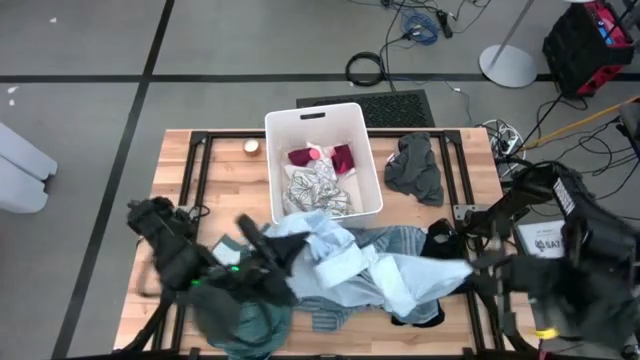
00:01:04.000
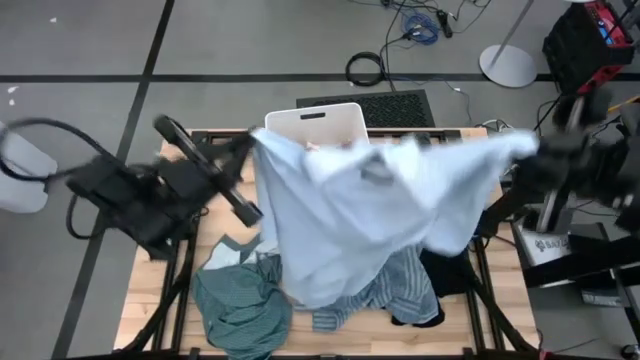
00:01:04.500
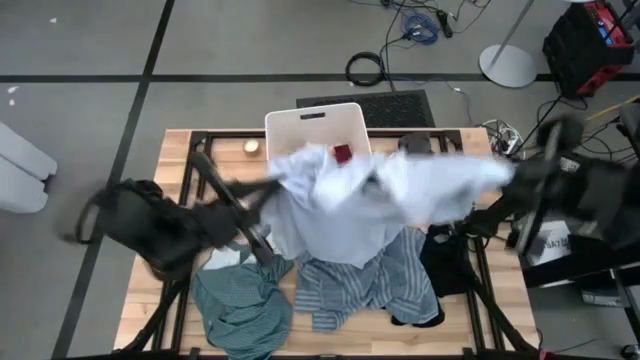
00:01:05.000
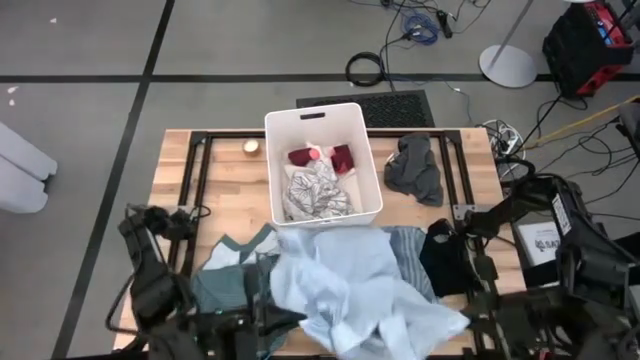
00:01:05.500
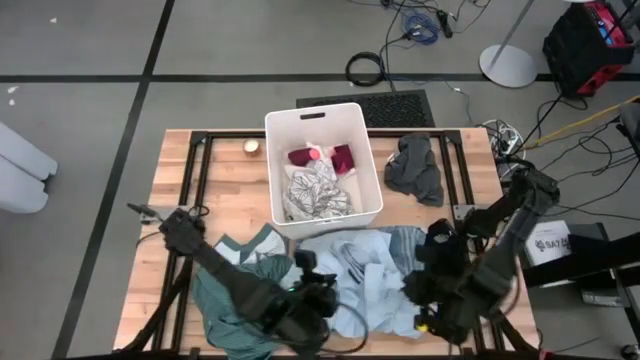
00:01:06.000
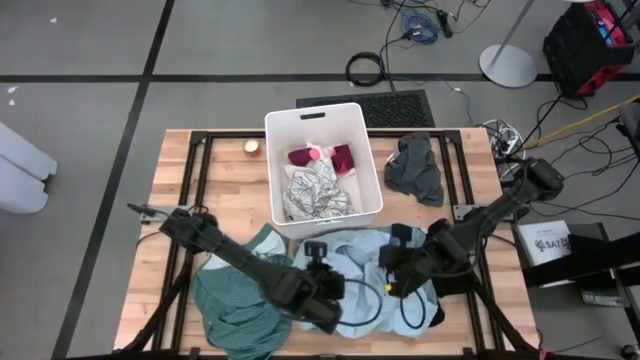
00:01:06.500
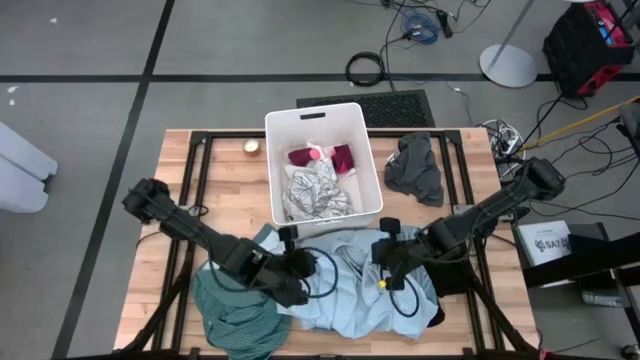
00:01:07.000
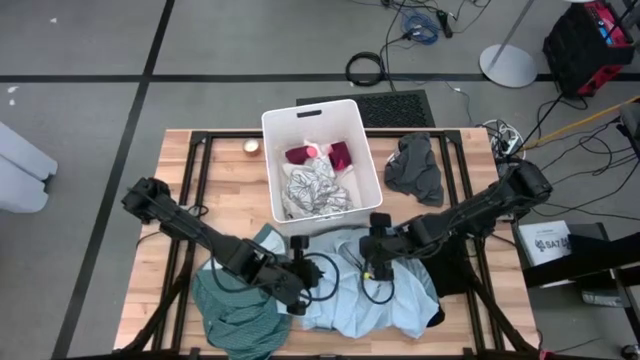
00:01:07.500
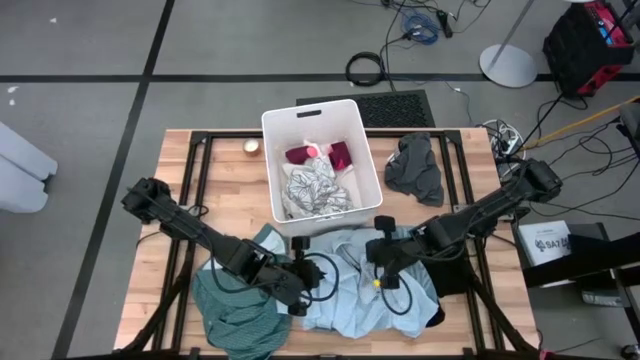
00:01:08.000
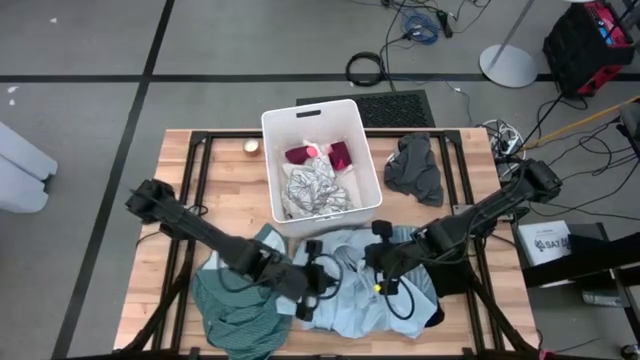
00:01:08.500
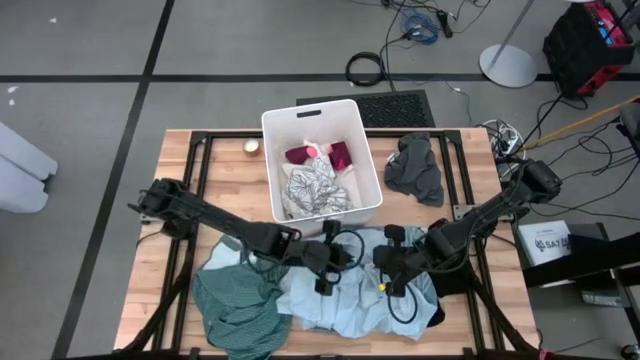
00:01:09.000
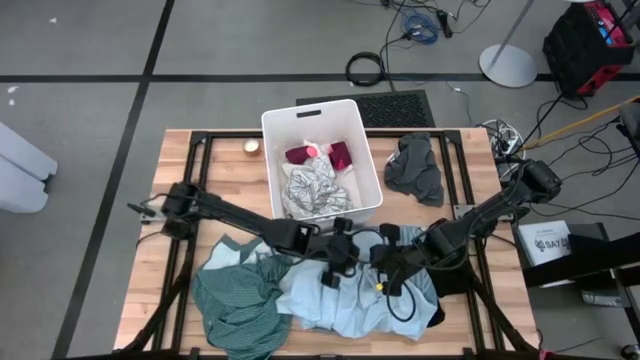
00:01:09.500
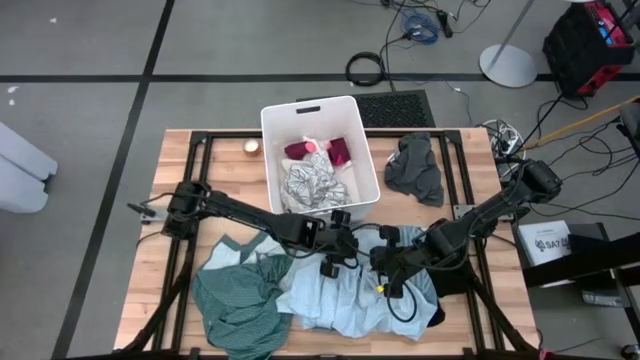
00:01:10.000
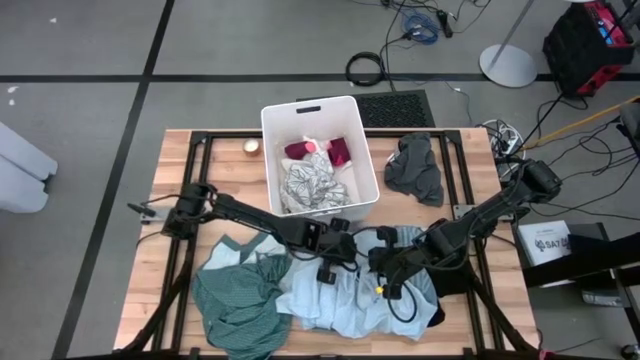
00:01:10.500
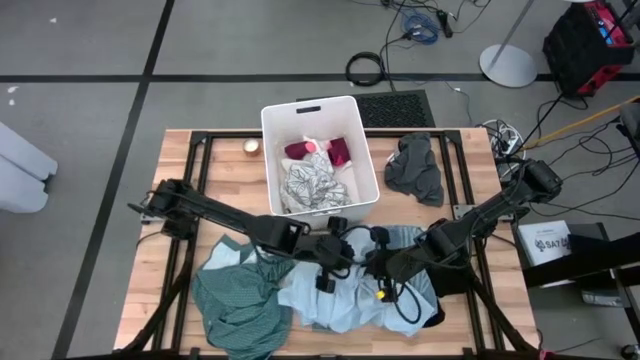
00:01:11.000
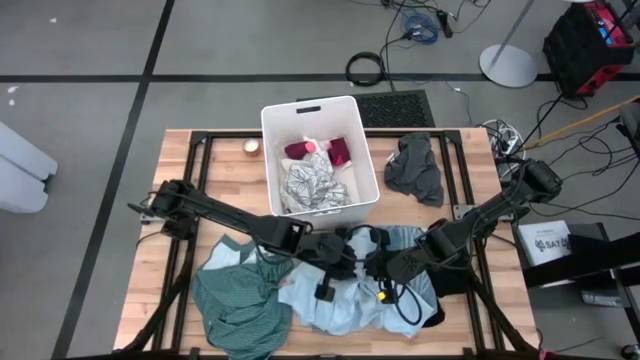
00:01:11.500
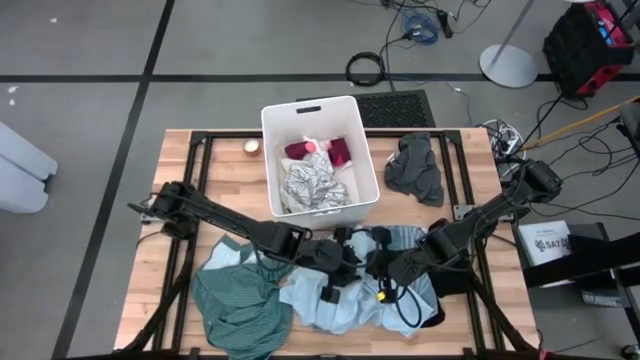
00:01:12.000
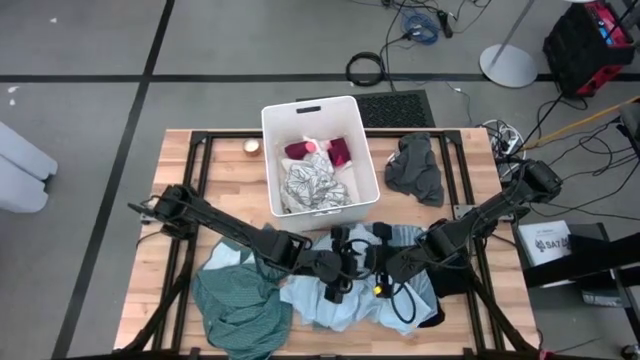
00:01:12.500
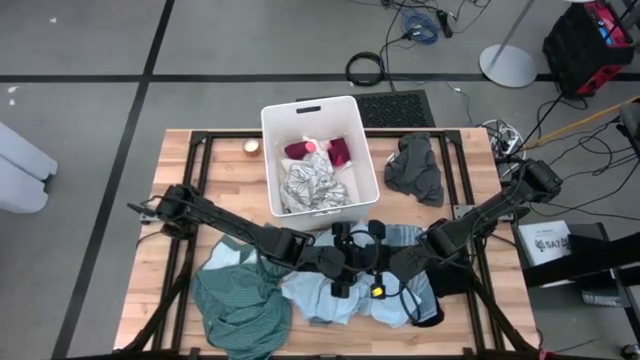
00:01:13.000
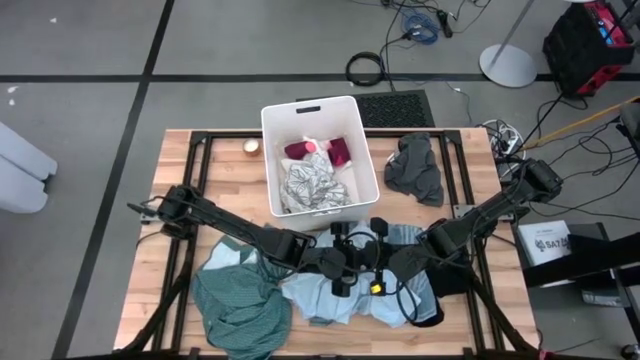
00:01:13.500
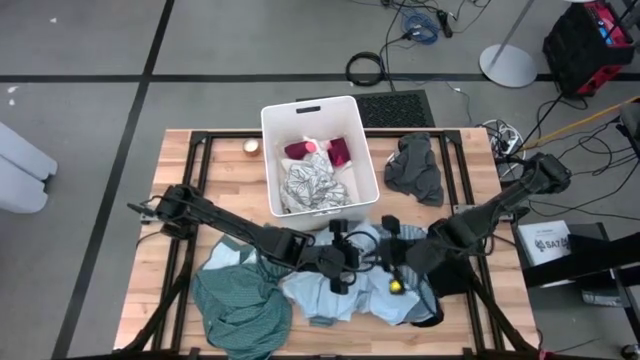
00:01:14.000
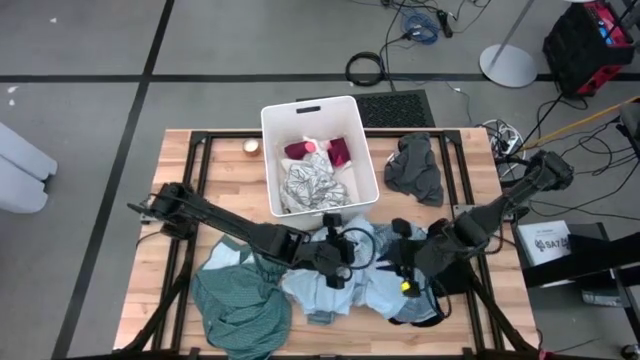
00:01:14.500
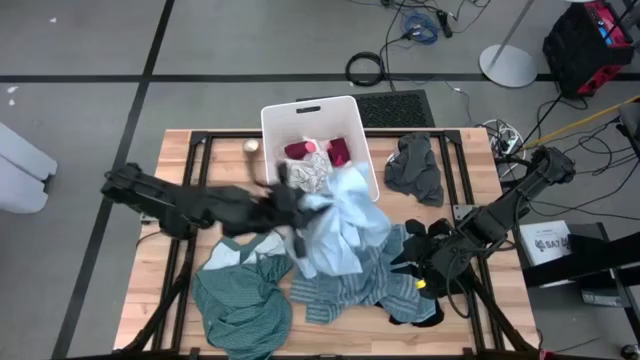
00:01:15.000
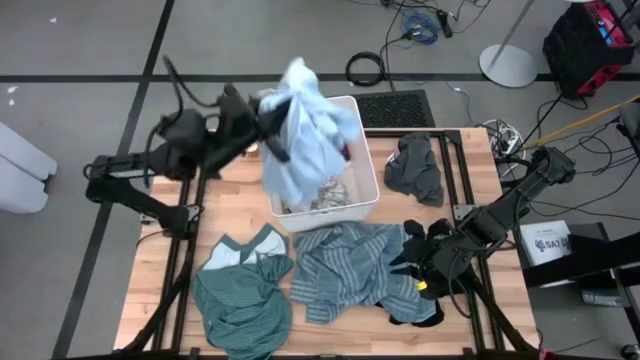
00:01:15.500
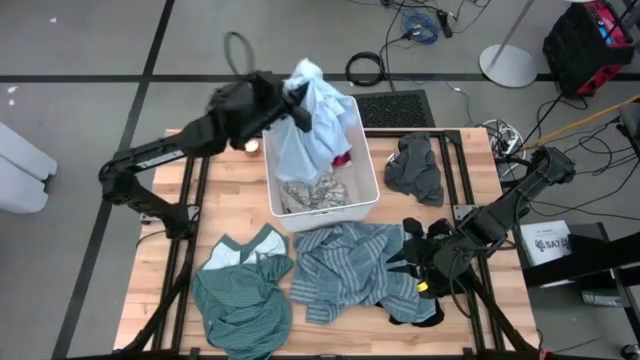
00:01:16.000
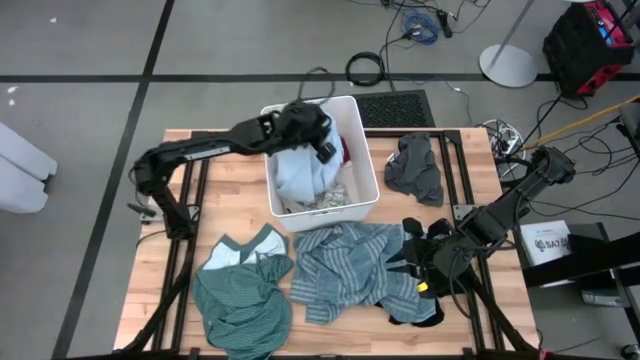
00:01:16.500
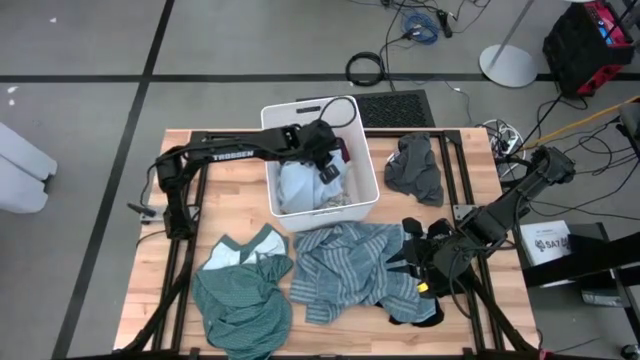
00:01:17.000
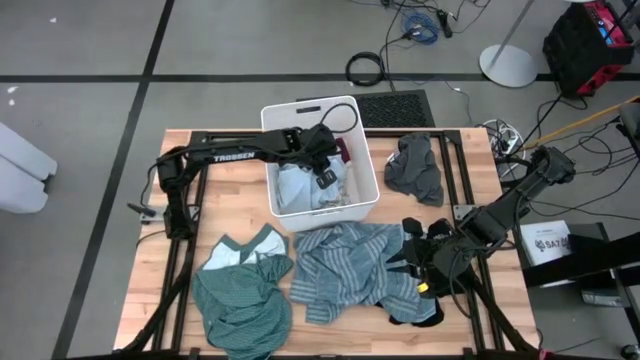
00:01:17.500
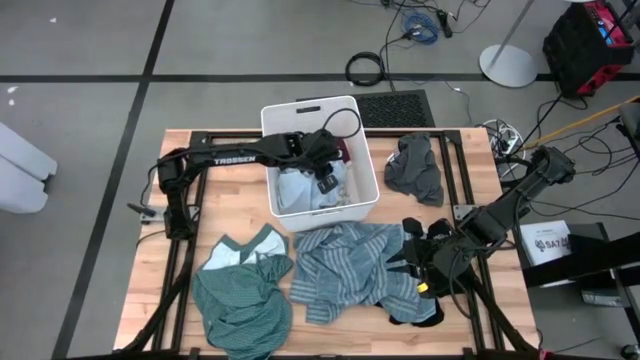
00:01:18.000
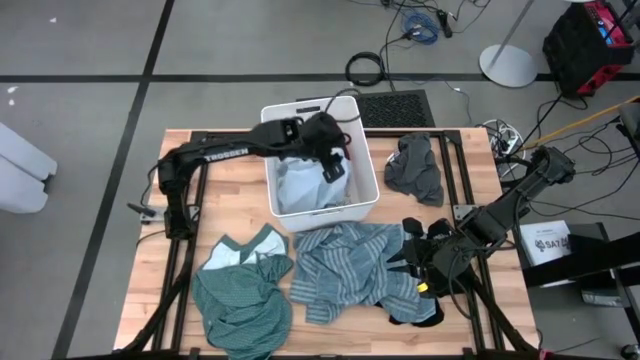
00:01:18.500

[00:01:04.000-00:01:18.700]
Task: Sort clothes
Put the light blue shirt into the white laundry bin

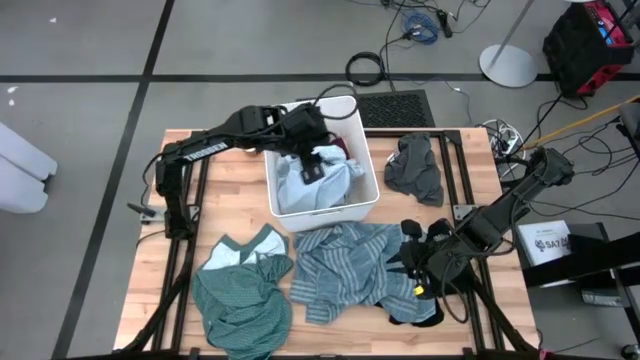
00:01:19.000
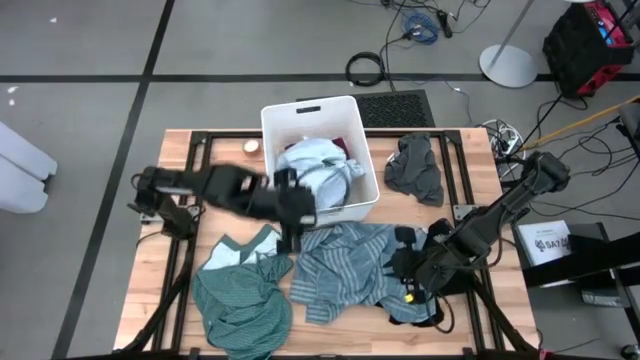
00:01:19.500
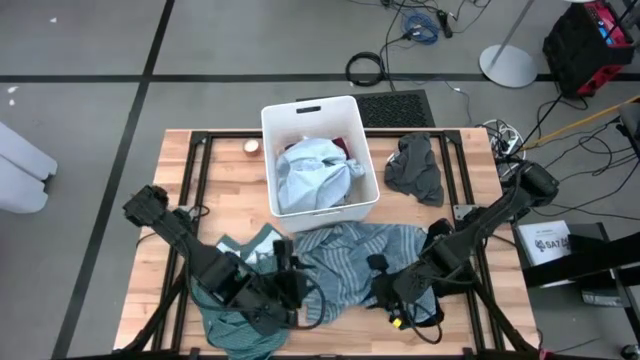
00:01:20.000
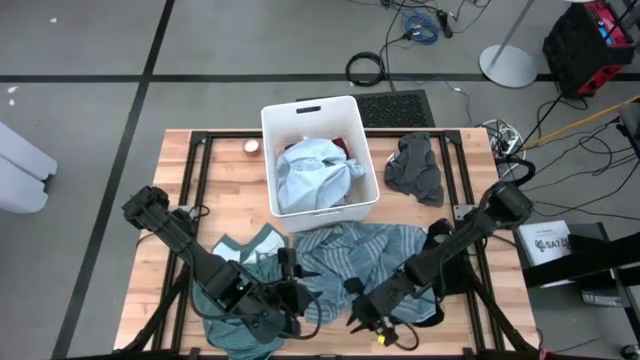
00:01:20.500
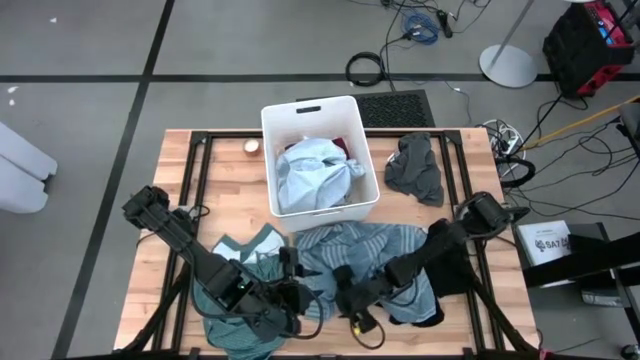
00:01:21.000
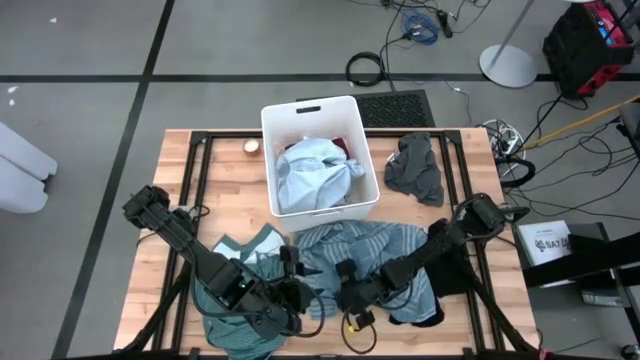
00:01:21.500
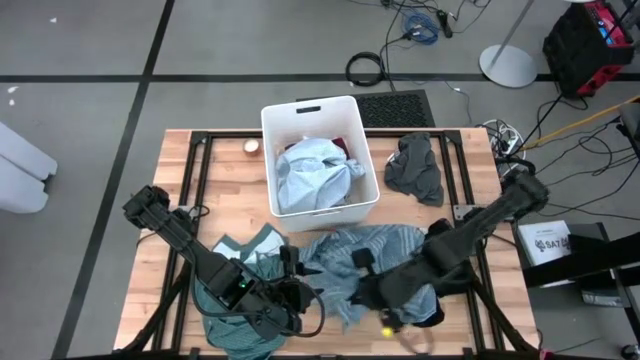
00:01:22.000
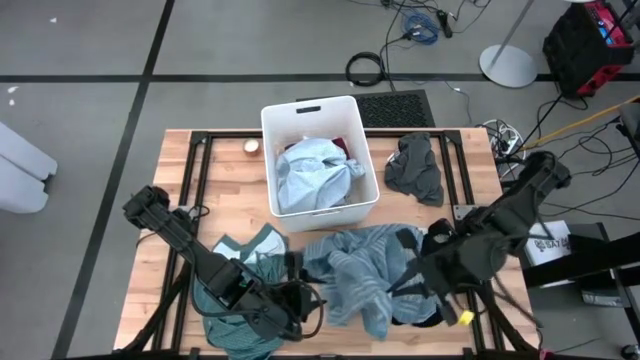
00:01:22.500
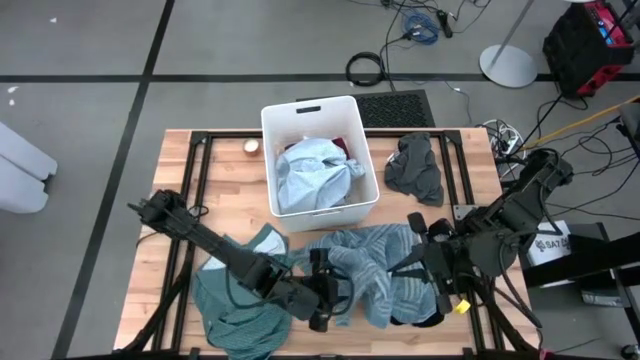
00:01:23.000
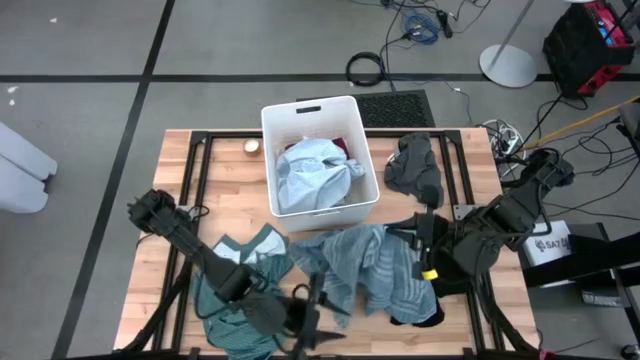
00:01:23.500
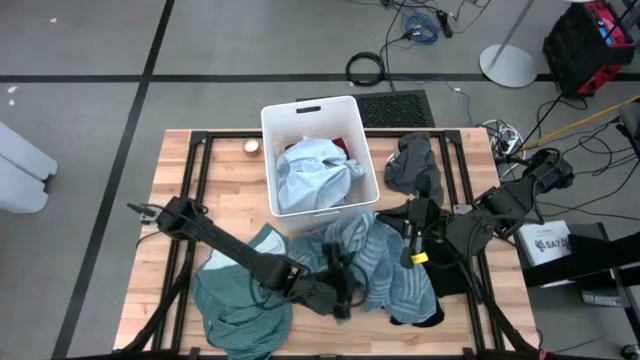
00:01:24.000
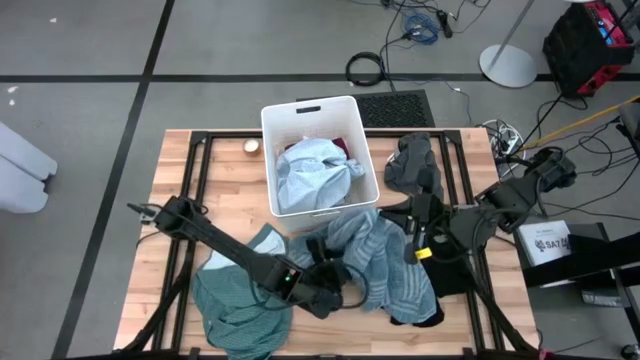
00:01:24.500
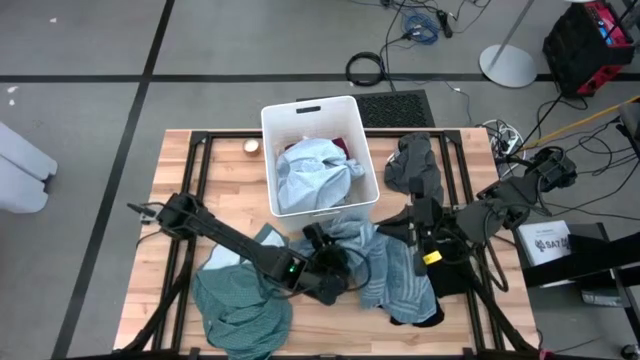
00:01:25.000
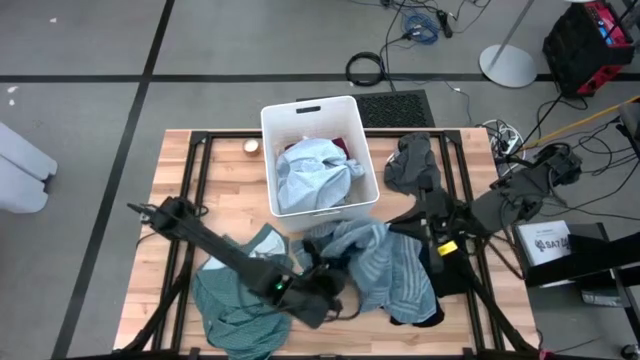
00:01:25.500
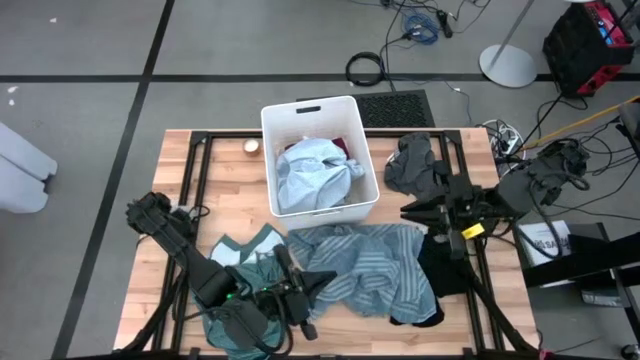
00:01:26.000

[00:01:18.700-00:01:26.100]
Put the blue shirt into the white laundry bin
